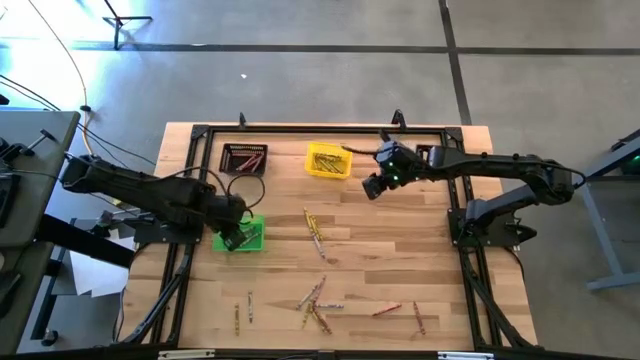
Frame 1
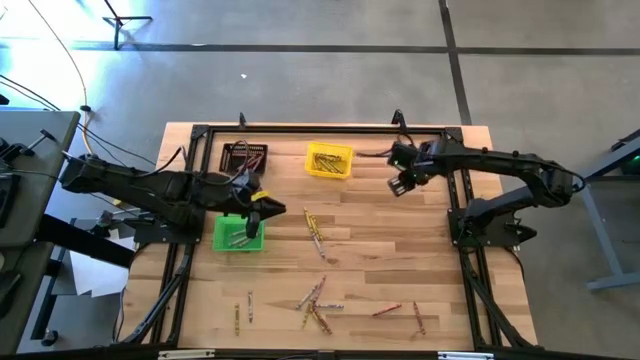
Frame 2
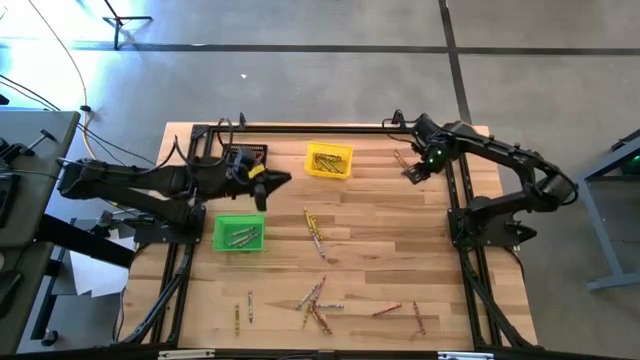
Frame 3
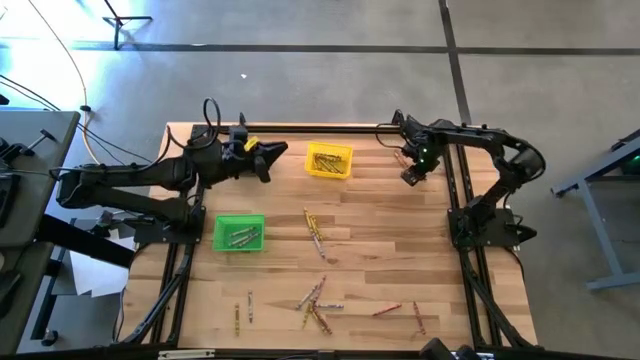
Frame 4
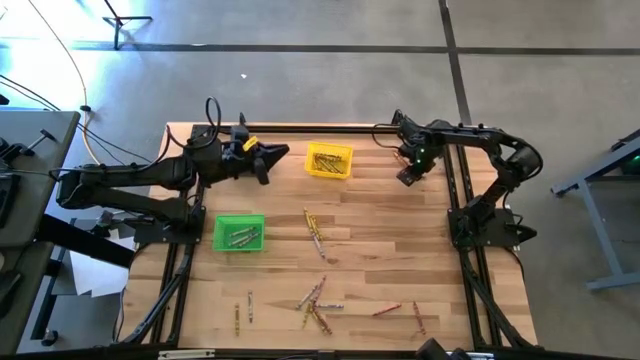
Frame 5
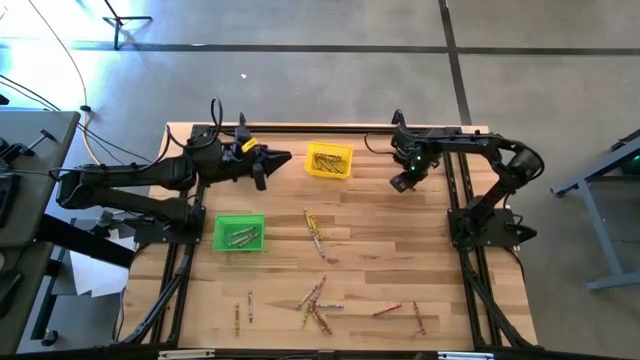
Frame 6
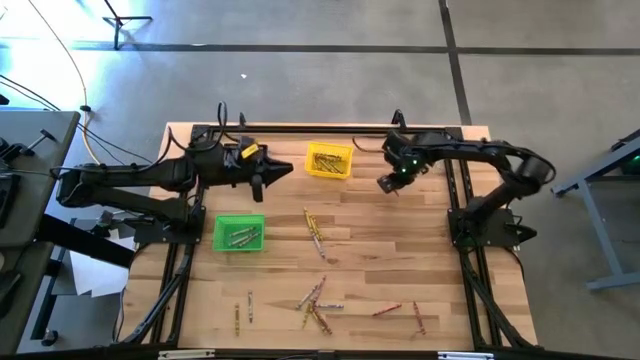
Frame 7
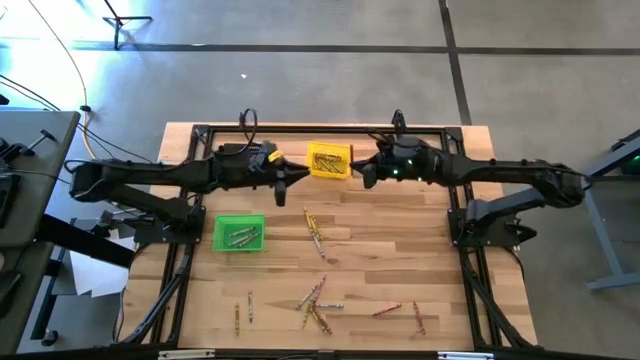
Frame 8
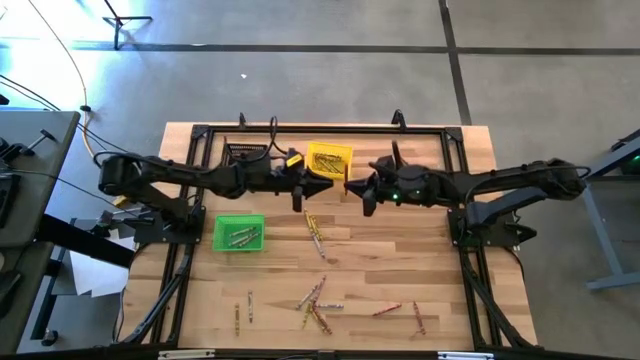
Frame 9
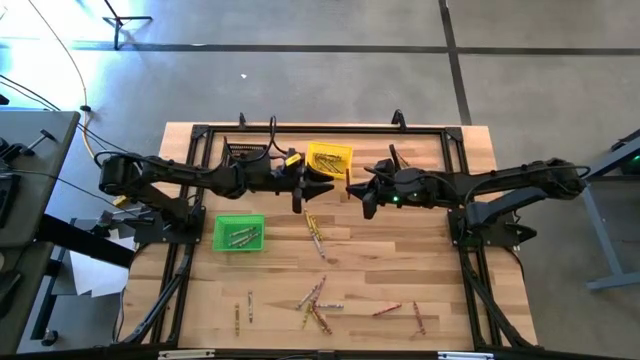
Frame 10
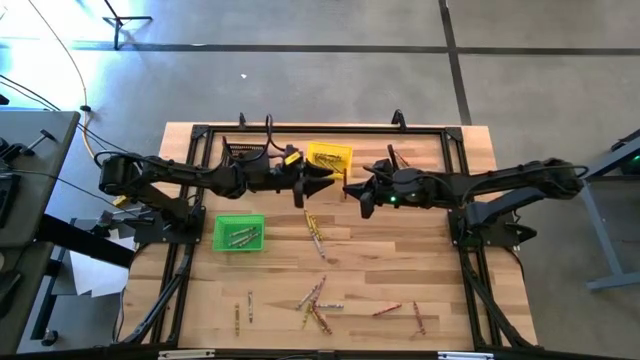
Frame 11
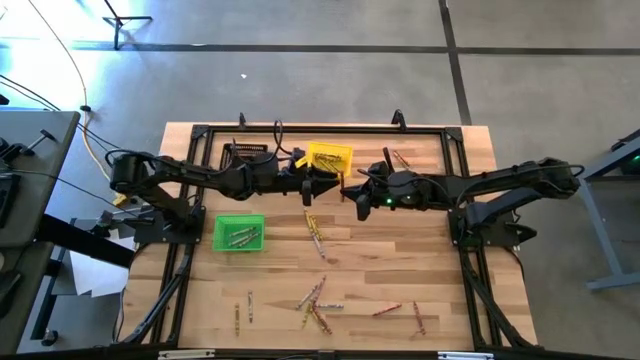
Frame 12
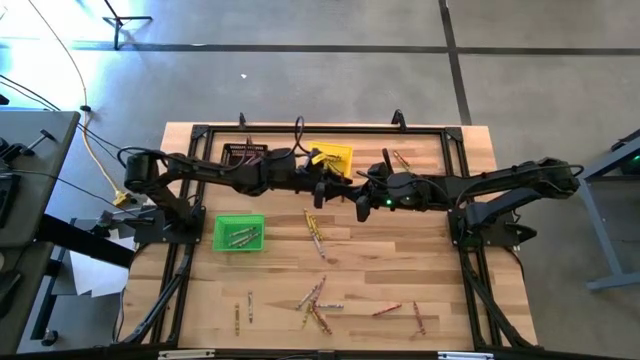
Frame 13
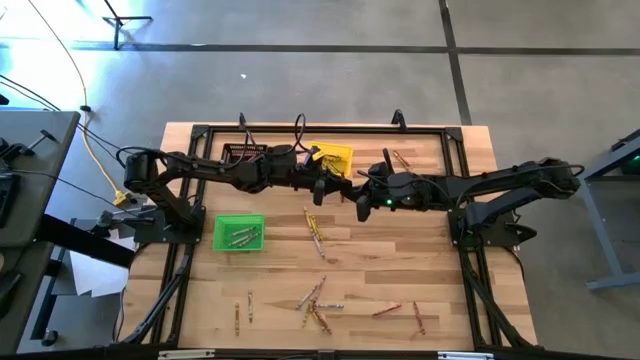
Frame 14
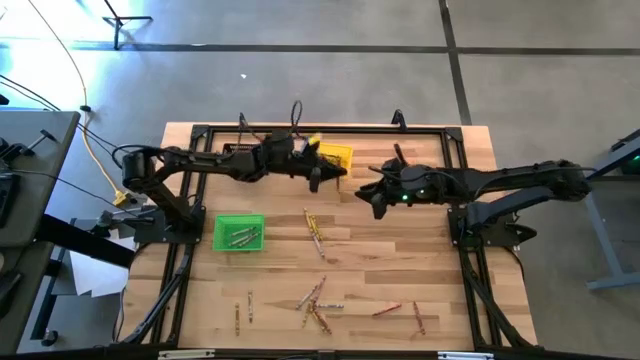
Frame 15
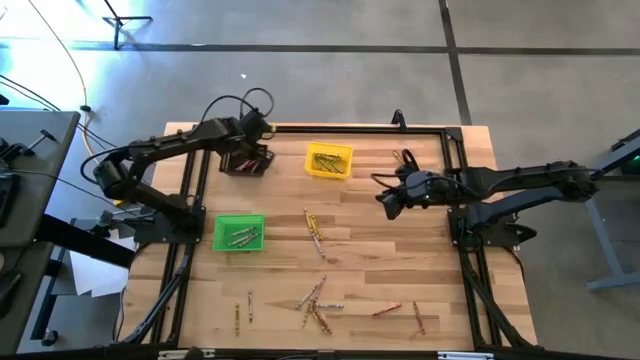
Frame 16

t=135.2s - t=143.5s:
Task: Sort crayons
Put the red crayon into the black bin

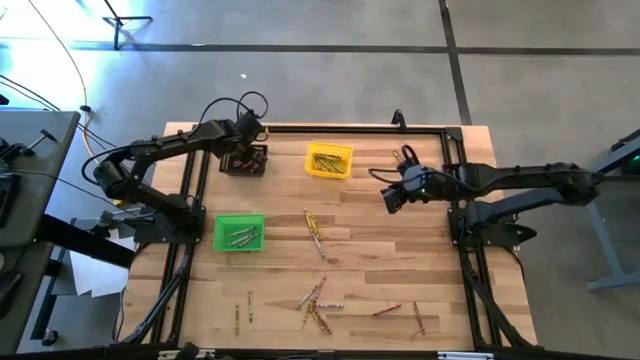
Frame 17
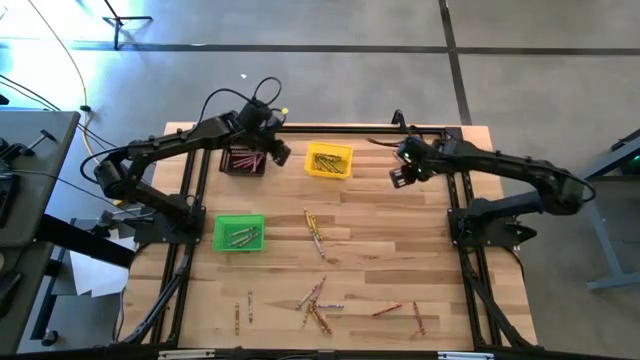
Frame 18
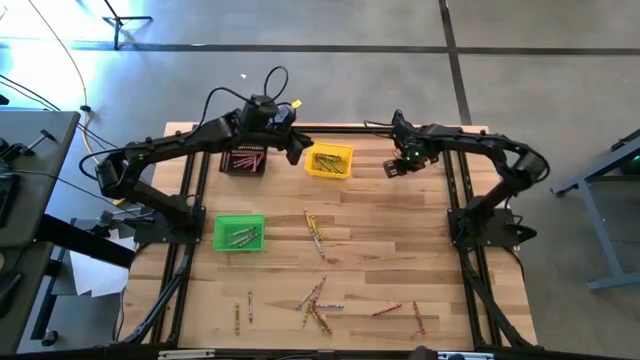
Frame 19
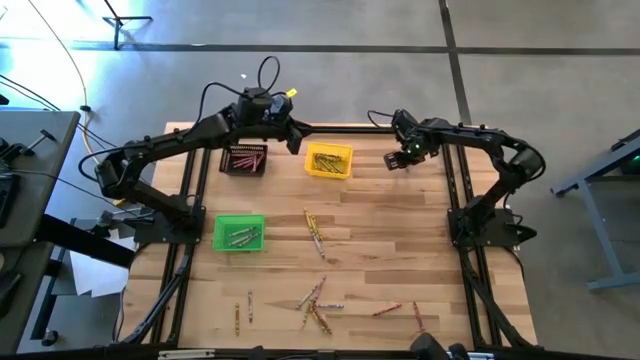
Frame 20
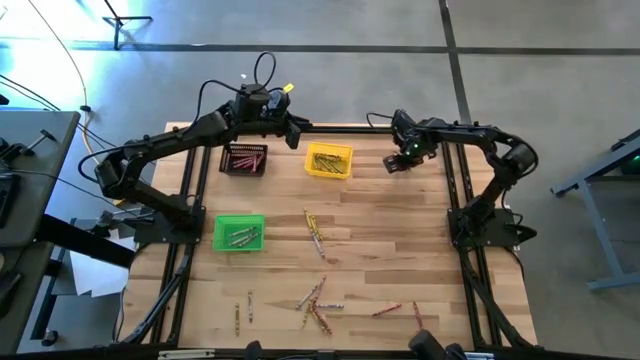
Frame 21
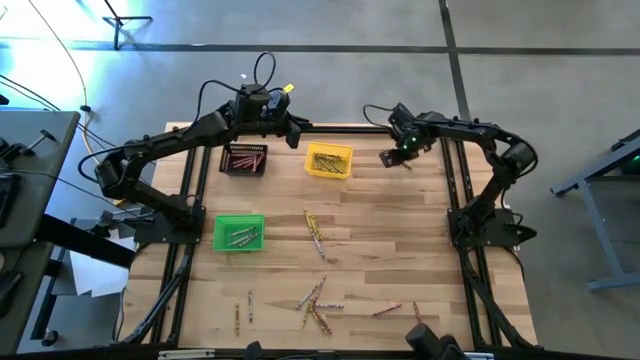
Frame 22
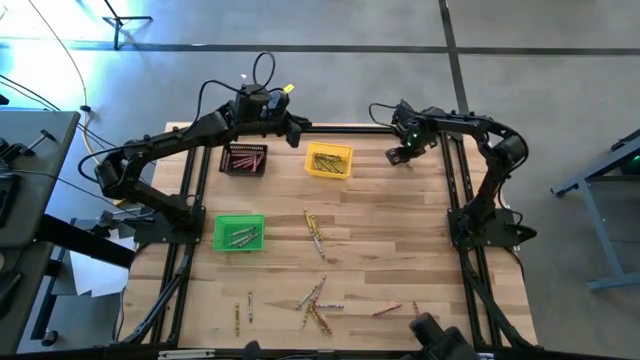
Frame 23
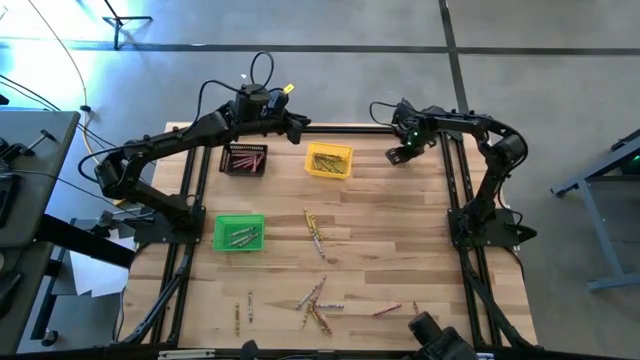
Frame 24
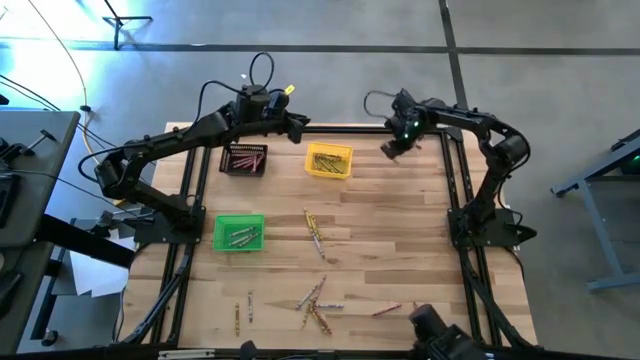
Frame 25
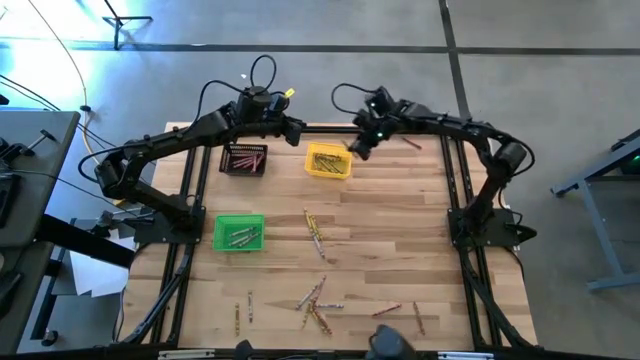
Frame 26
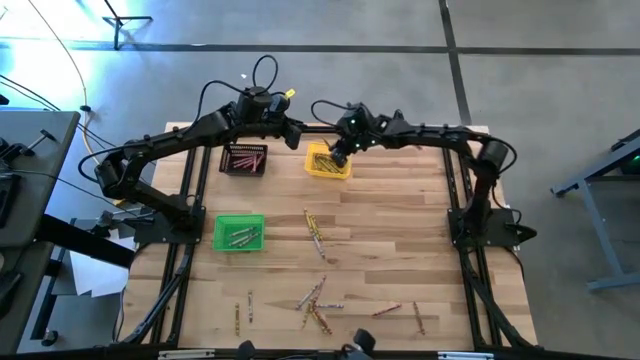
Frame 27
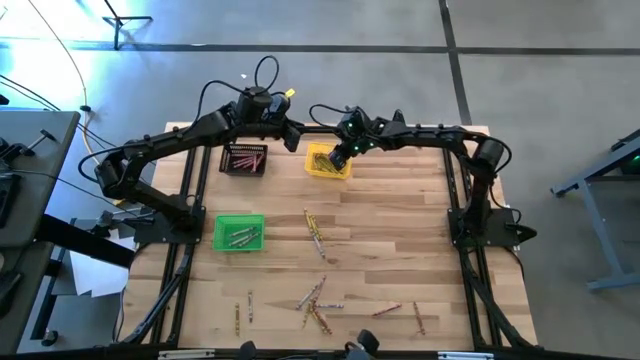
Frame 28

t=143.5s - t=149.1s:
Put the yellow crayon into the yellow bin

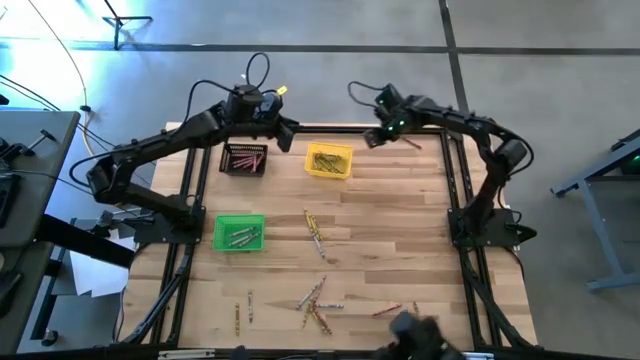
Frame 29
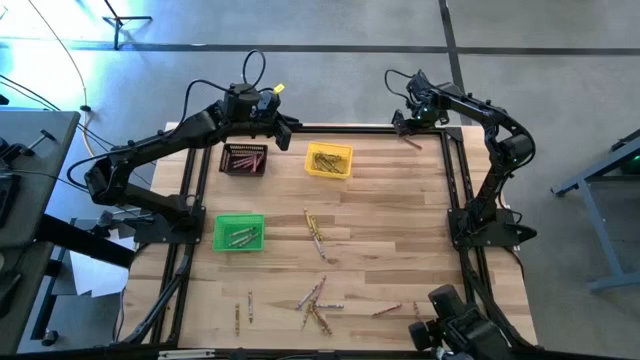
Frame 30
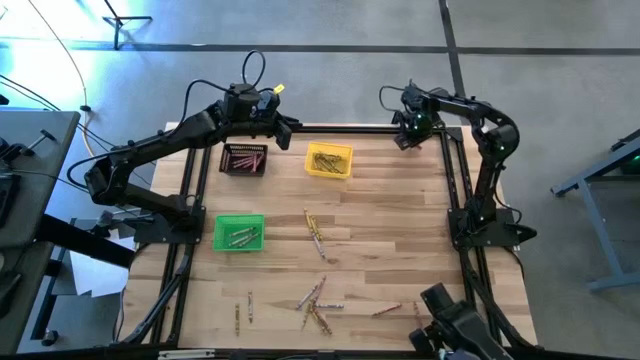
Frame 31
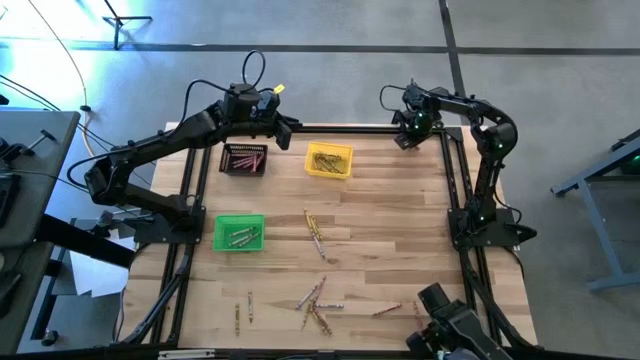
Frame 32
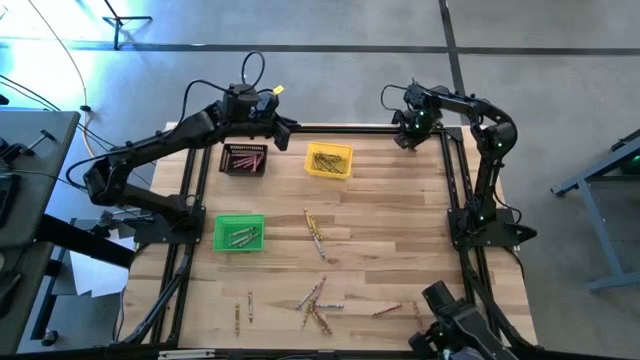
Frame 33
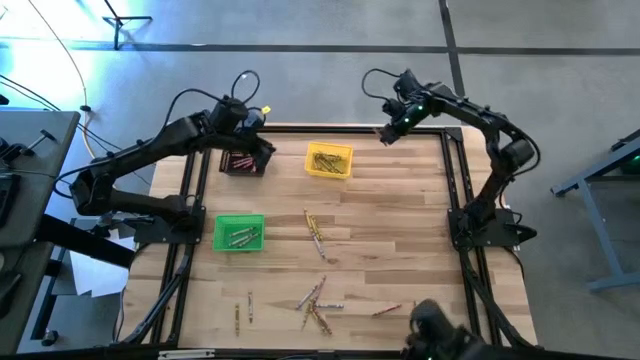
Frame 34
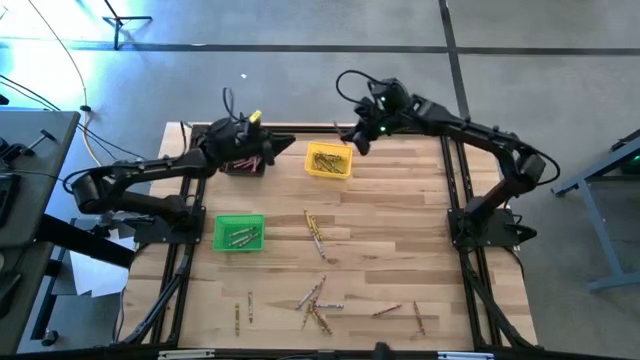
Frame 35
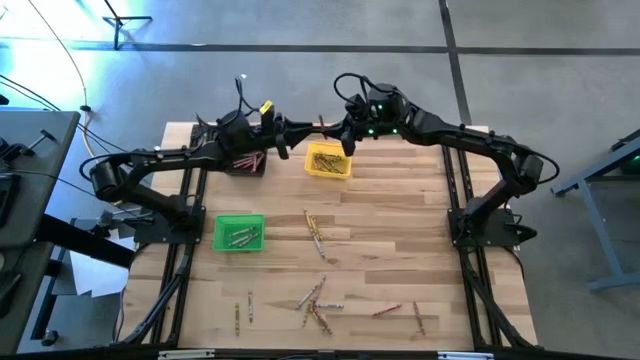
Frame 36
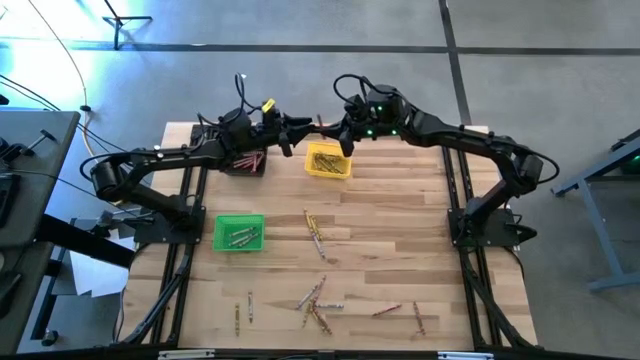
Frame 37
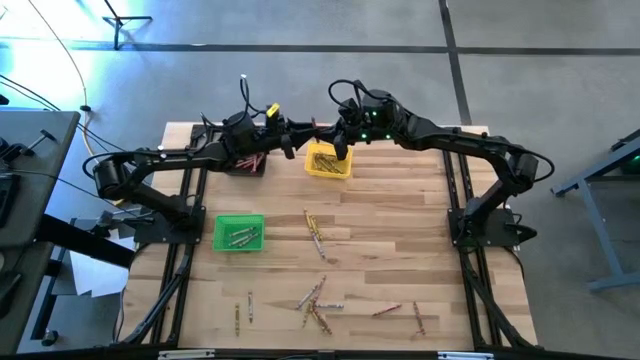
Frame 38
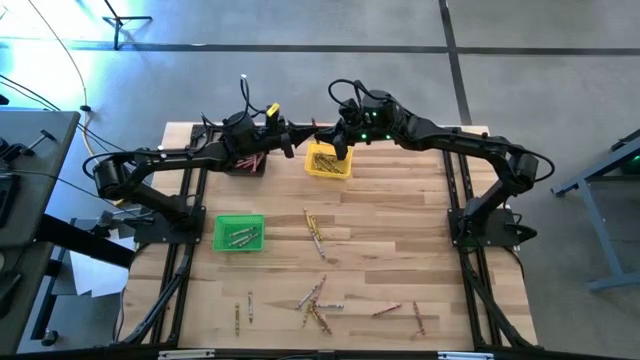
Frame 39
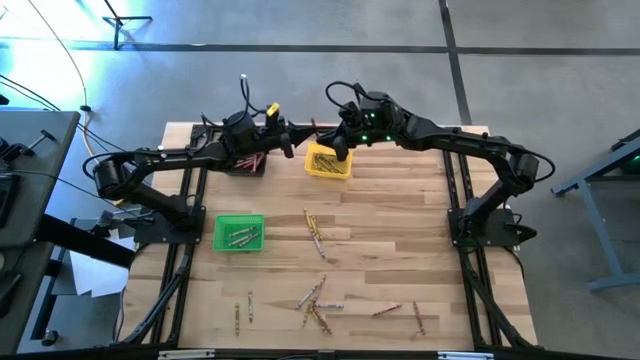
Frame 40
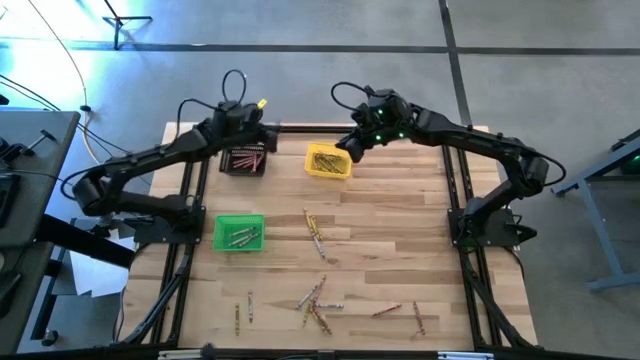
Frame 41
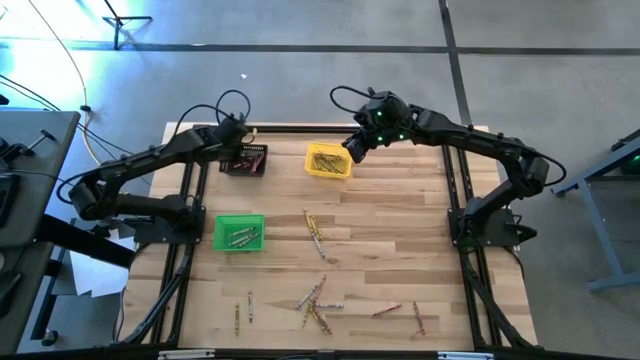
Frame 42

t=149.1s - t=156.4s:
Put the red crayon into the black bin
